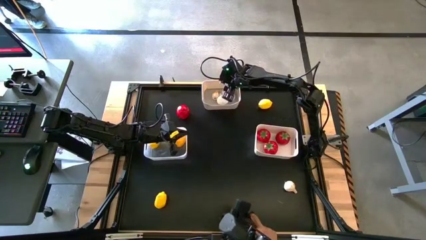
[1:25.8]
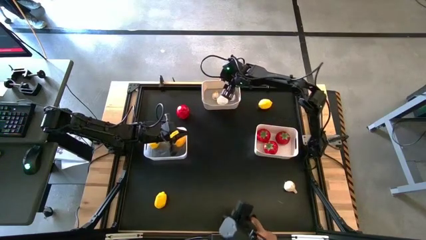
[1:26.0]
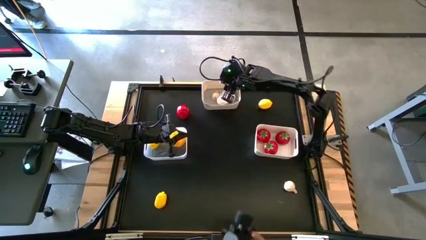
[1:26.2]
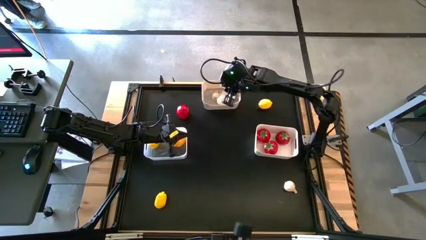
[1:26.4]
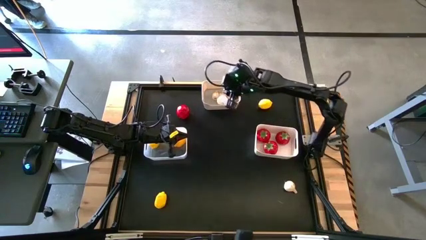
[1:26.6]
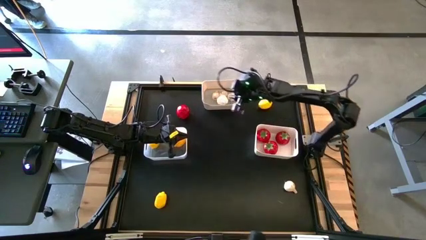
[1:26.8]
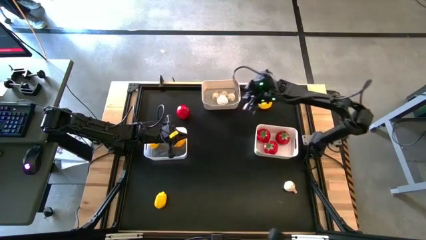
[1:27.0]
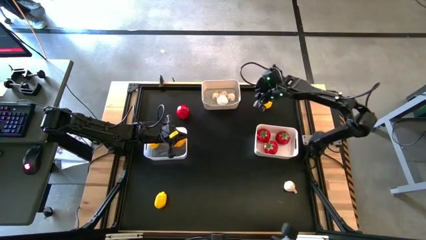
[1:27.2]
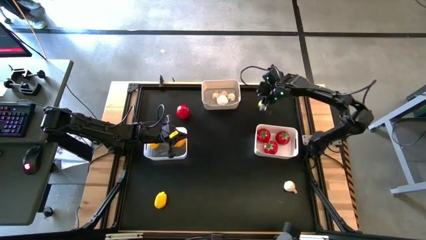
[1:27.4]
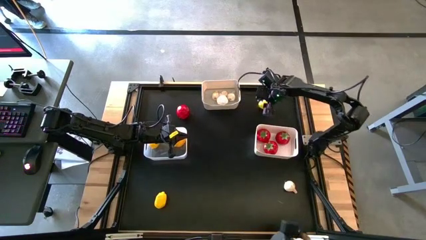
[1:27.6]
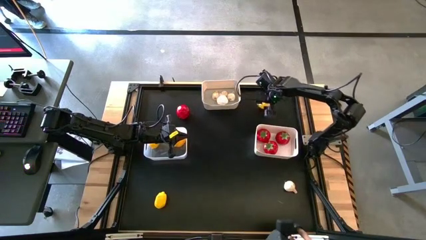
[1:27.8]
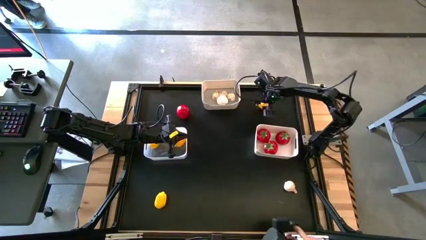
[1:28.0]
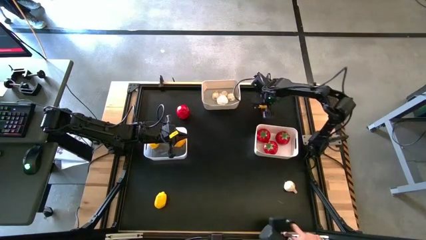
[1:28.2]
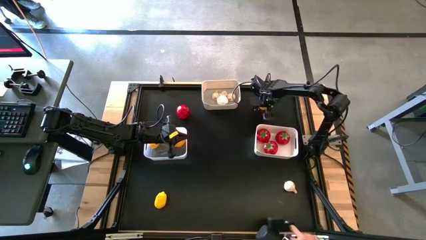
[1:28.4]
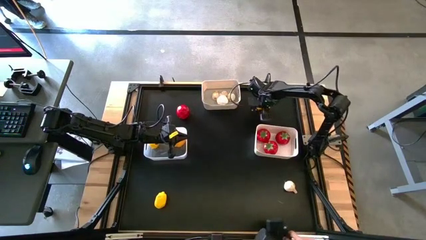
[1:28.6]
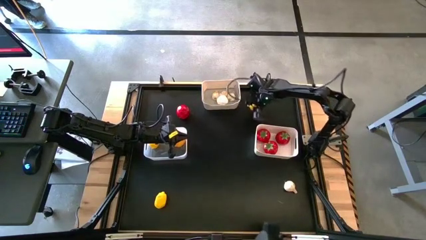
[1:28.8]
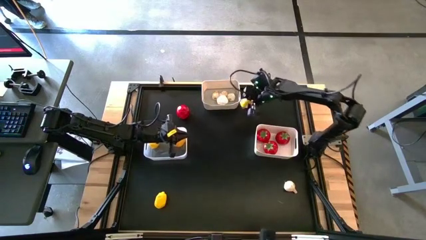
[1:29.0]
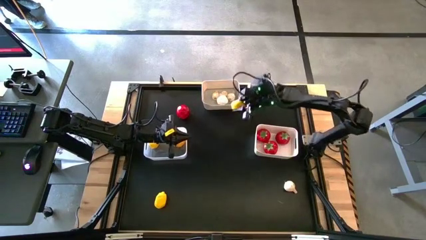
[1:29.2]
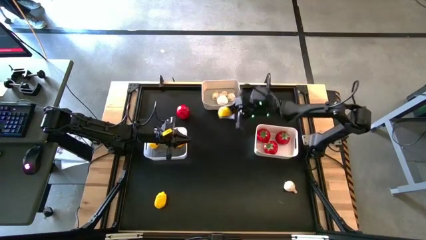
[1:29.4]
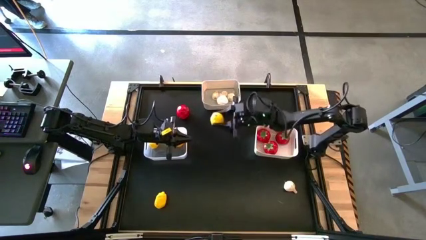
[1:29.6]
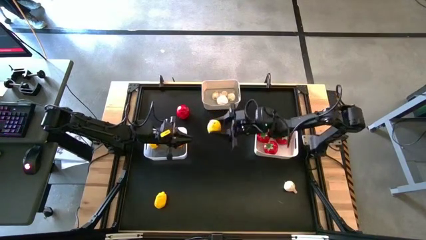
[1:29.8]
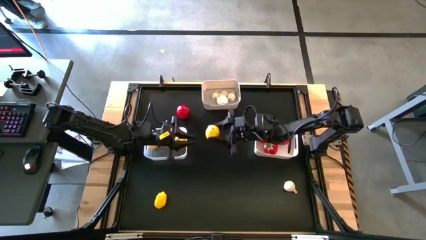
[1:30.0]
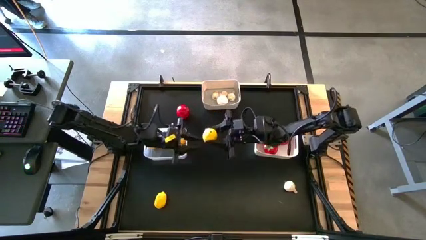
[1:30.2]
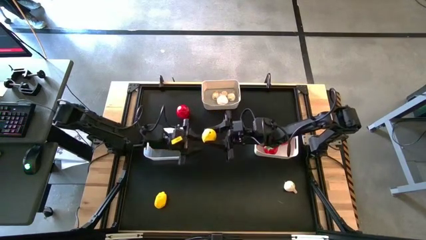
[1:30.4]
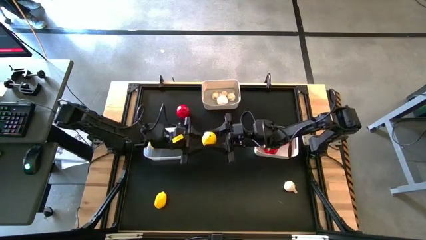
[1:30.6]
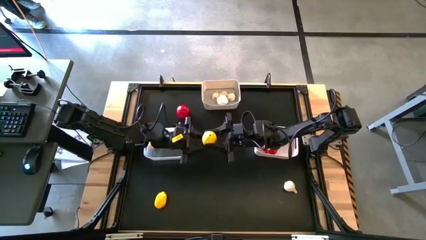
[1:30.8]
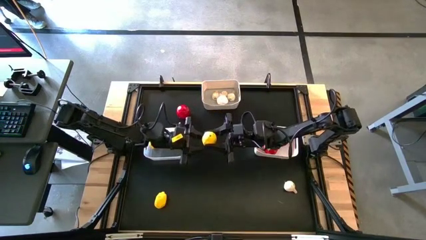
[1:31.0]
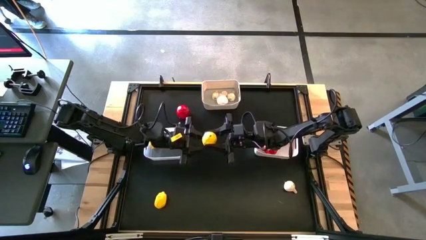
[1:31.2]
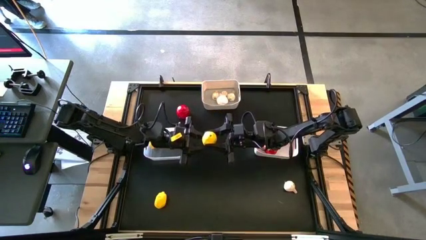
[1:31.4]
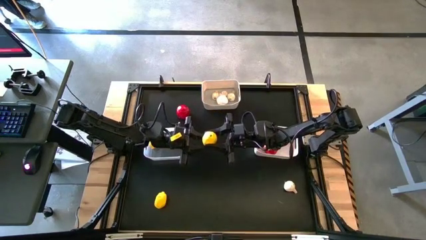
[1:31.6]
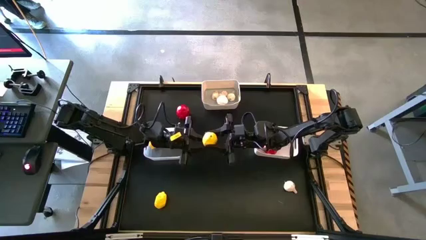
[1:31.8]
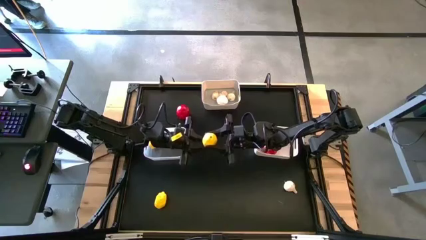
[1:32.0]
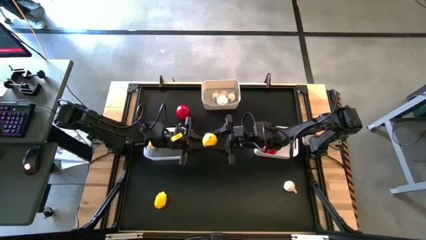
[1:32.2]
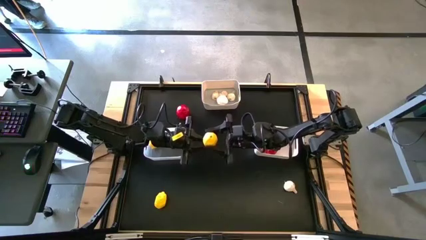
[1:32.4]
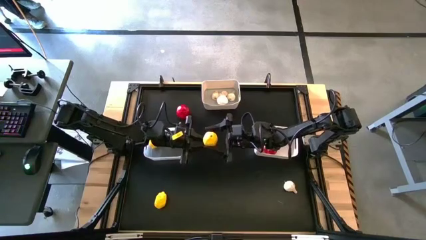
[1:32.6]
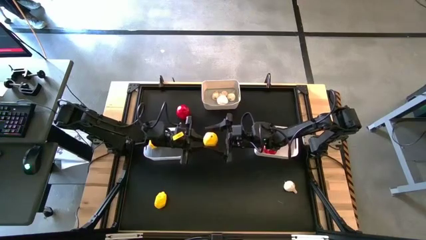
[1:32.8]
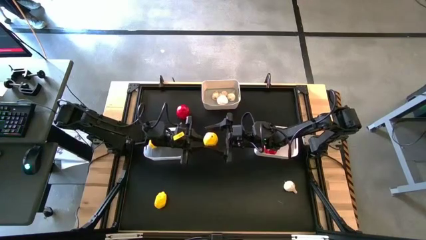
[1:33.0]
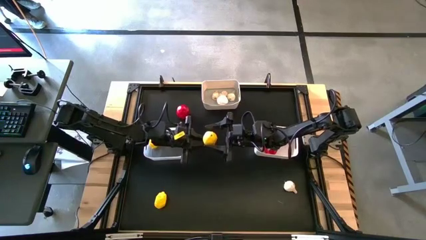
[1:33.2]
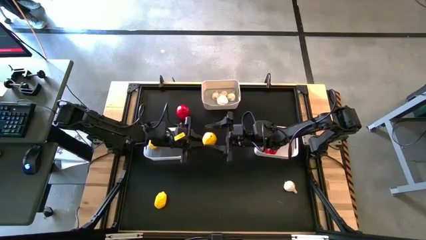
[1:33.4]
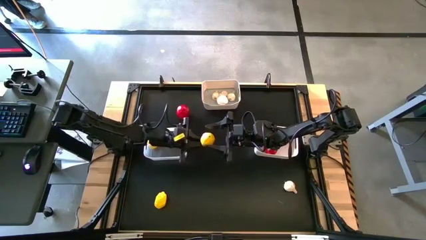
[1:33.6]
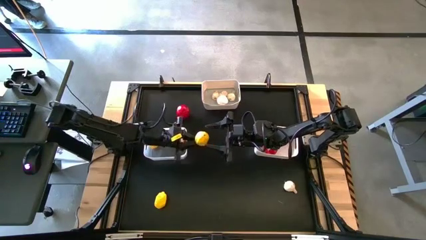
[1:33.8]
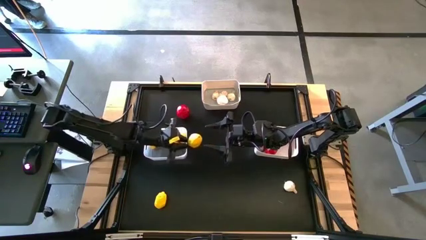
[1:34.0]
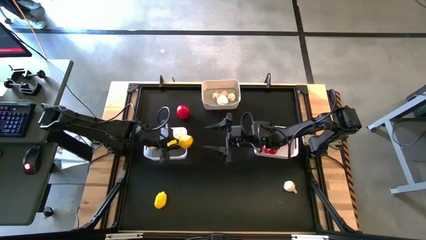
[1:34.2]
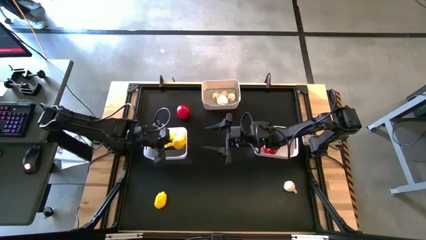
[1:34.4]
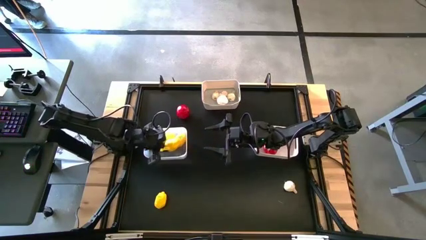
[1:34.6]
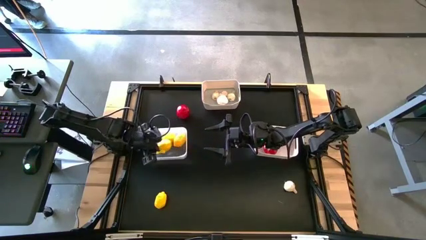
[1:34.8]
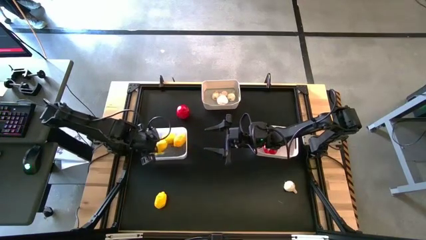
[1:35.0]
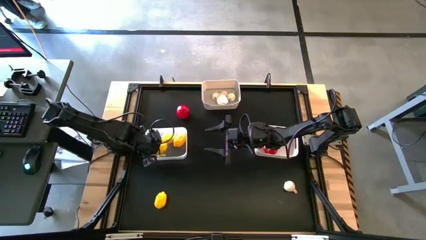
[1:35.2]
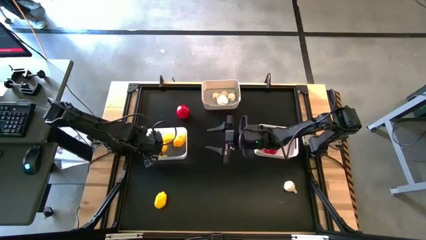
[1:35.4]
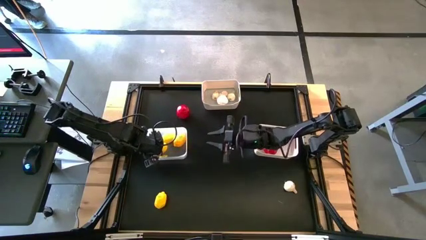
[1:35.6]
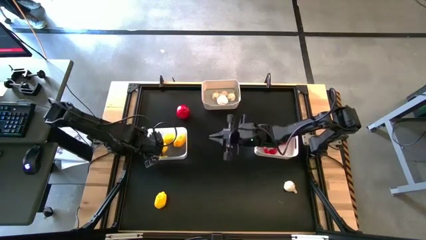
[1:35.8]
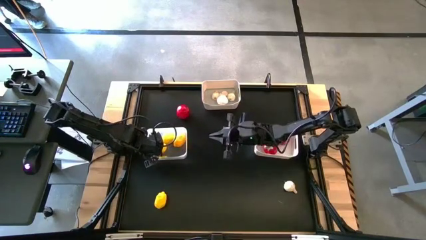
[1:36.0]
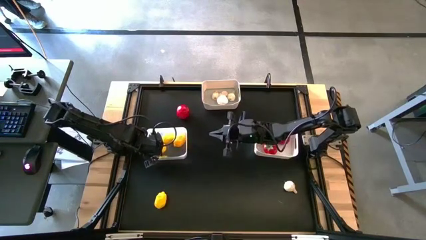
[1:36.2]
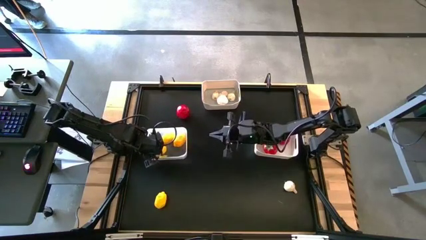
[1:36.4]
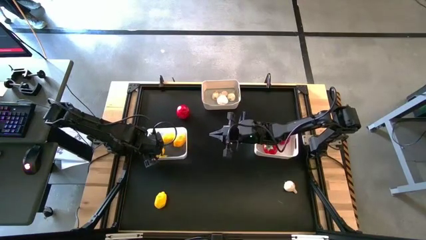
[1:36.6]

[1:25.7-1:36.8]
Task: Sort produce into baskets
Put the yellow lemon into the transparent bin

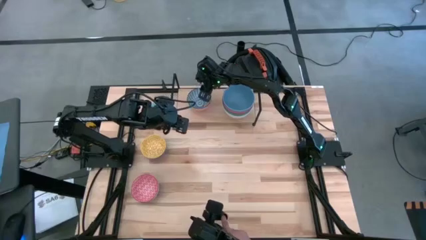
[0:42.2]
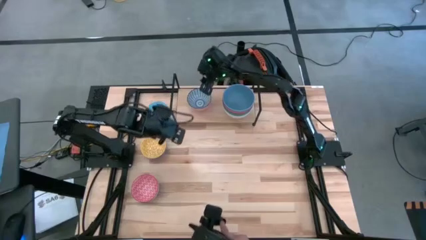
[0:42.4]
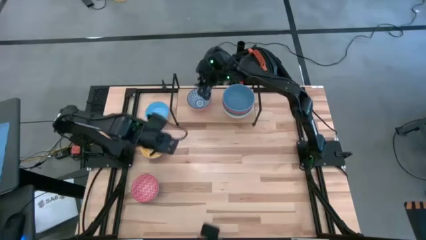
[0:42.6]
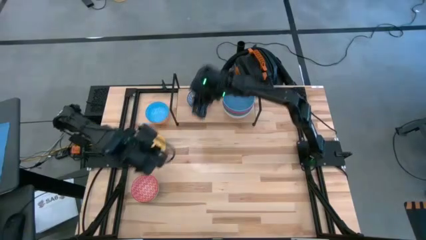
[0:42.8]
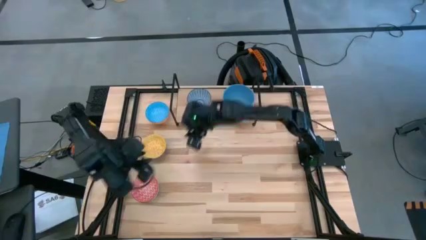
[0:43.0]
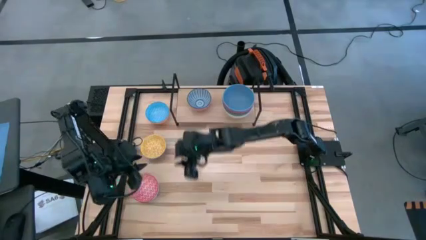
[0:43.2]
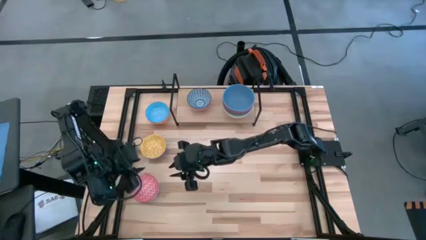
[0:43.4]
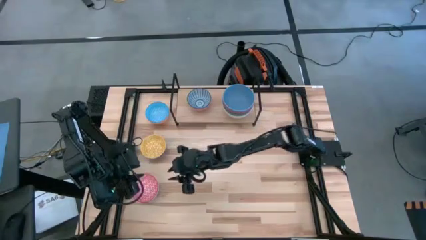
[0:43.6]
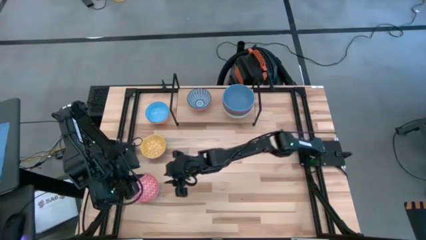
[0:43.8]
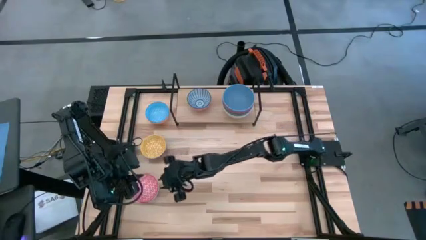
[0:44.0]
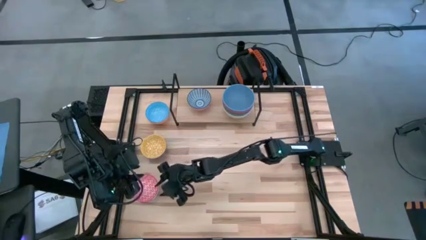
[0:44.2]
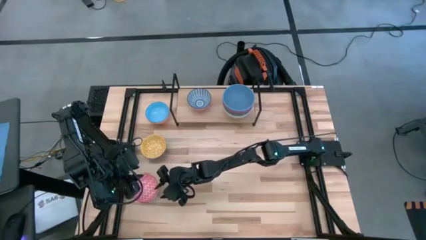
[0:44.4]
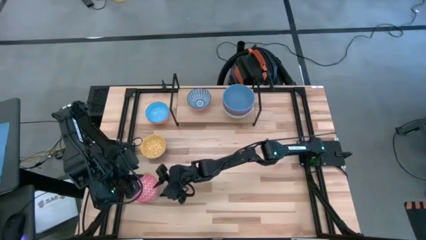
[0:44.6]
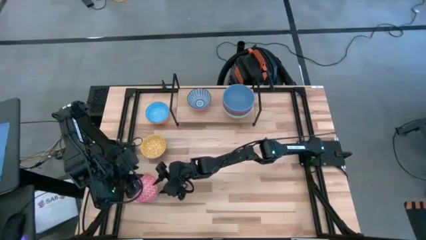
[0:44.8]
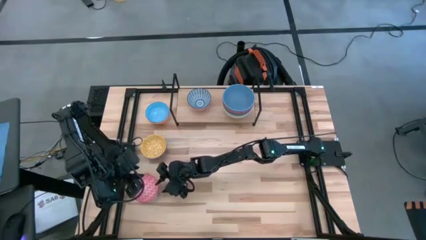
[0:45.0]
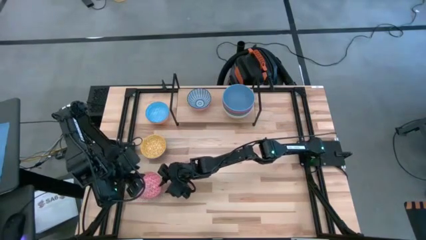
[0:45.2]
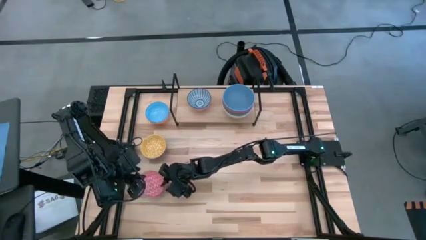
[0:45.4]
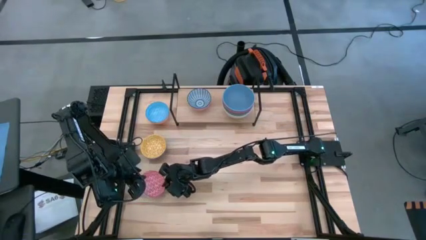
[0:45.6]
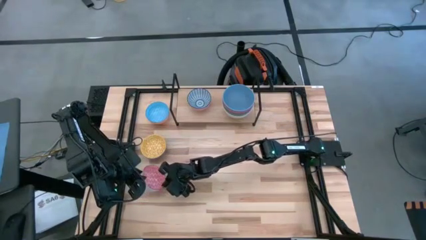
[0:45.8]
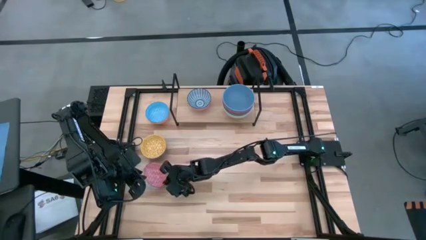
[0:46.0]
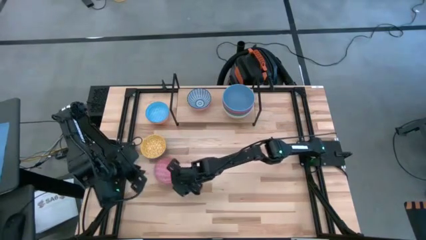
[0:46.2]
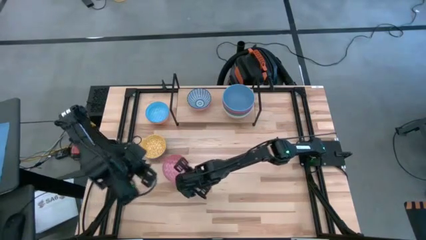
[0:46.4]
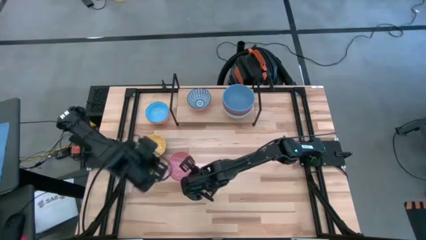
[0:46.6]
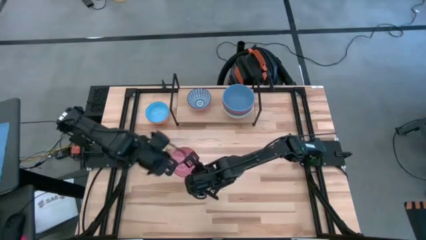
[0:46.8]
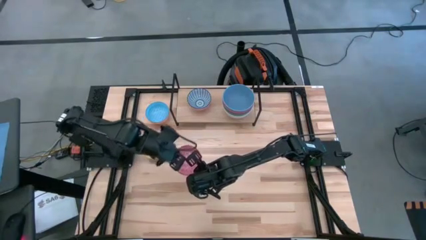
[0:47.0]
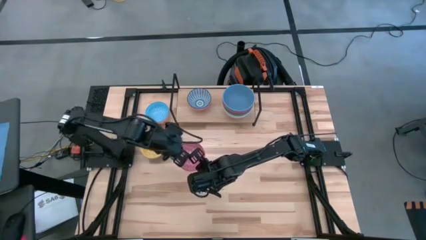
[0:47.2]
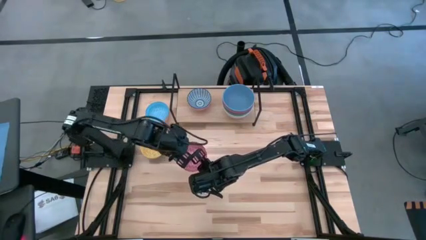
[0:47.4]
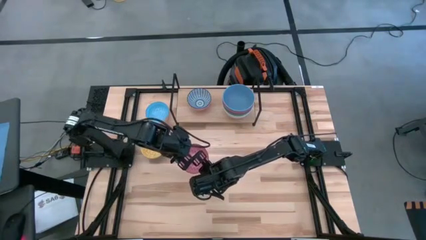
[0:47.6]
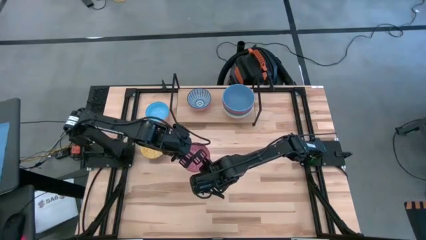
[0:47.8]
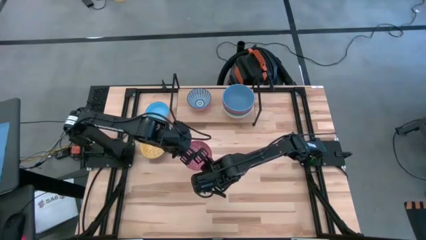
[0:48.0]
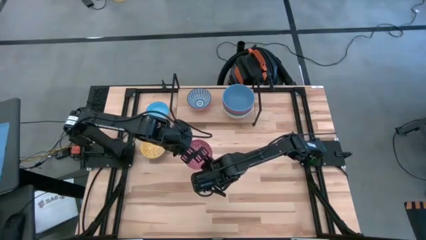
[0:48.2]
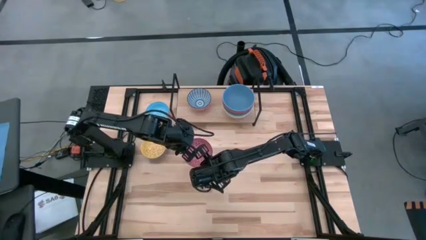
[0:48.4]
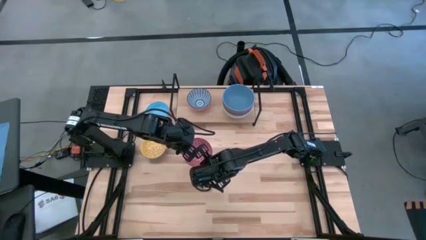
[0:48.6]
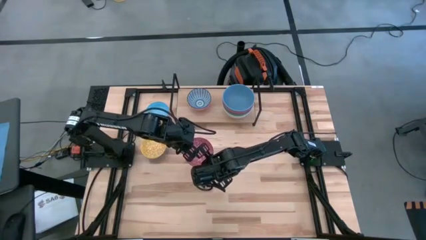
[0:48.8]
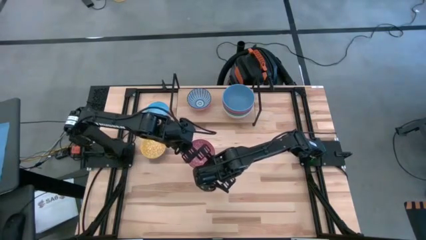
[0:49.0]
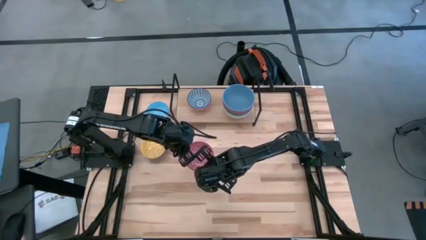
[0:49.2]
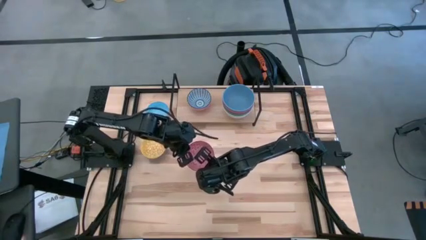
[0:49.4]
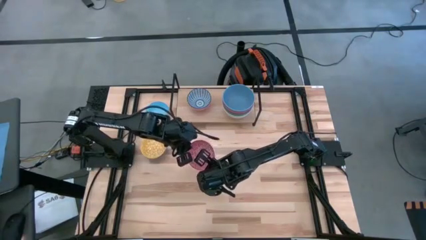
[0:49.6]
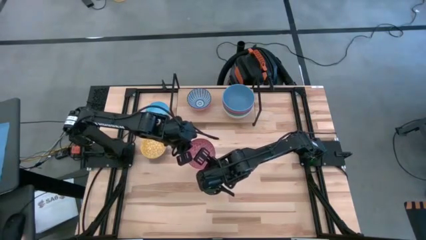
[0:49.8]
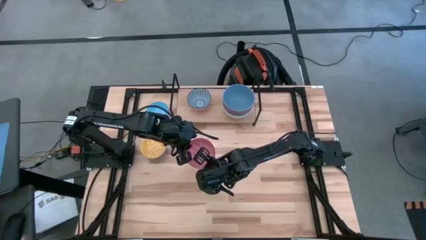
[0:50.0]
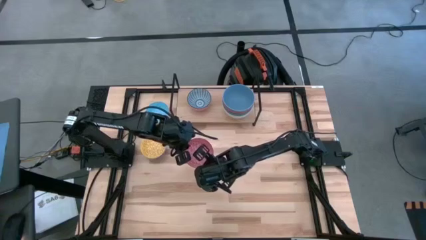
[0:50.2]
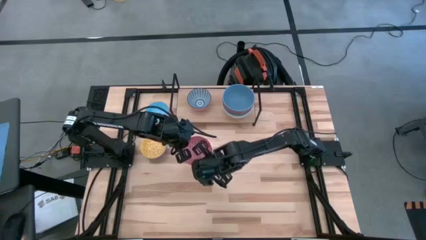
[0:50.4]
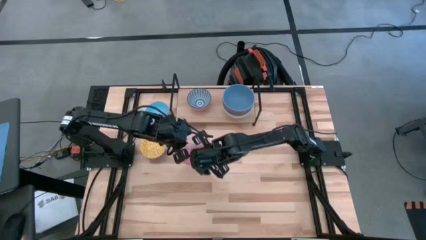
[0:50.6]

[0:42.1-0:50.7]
Task: Place and stack bowls onto a shelf
Stack the small red bowl on the small blue bowl on the shelf
